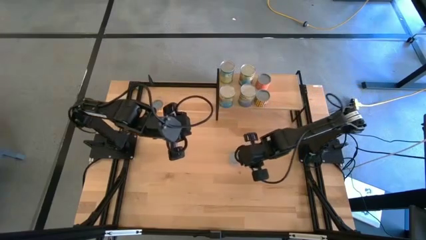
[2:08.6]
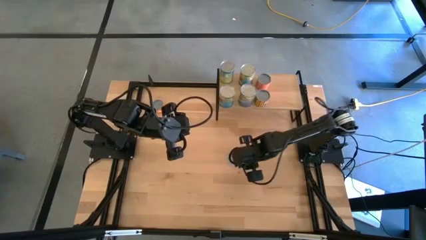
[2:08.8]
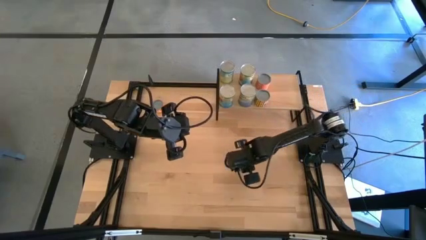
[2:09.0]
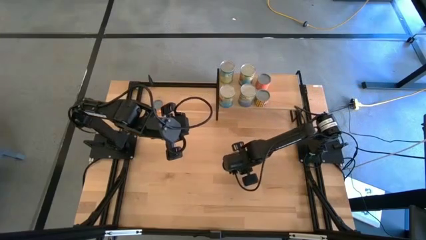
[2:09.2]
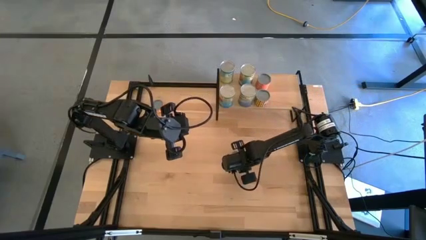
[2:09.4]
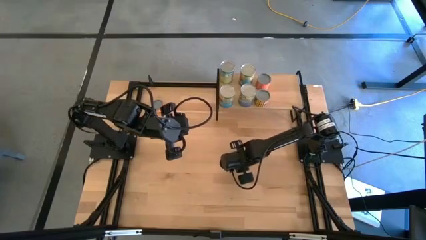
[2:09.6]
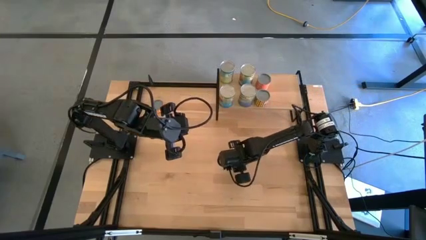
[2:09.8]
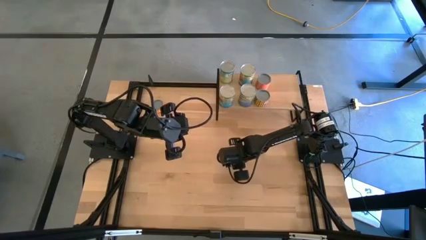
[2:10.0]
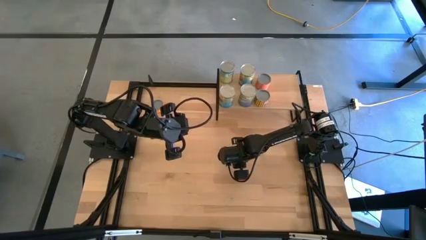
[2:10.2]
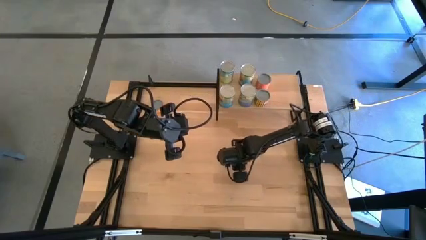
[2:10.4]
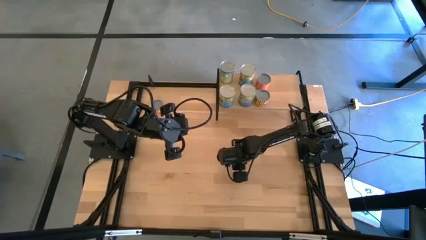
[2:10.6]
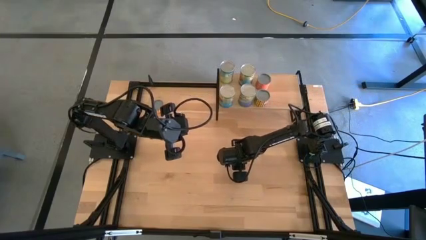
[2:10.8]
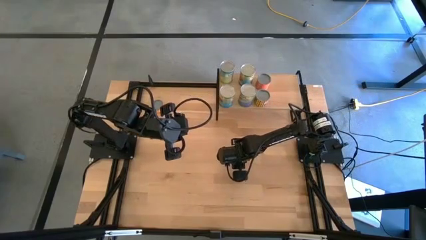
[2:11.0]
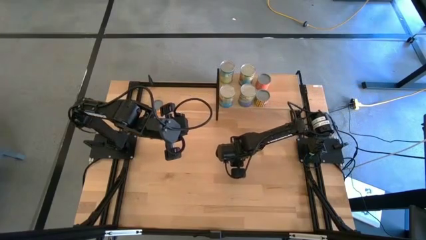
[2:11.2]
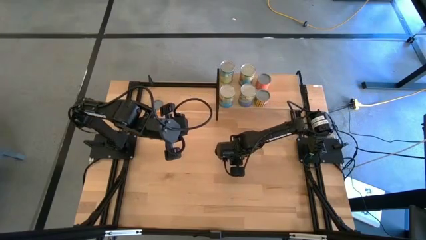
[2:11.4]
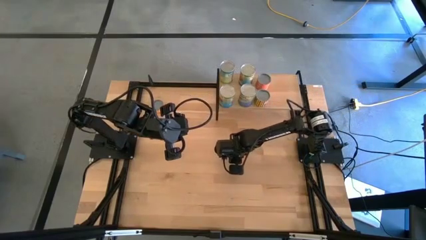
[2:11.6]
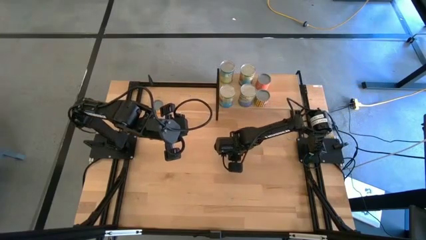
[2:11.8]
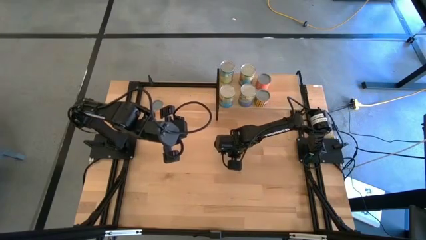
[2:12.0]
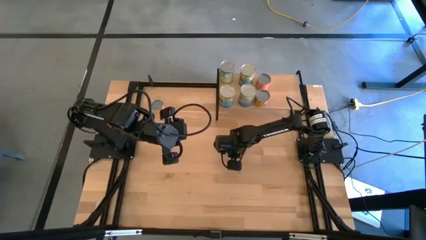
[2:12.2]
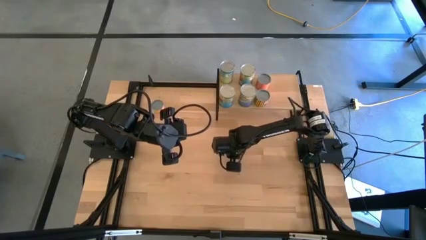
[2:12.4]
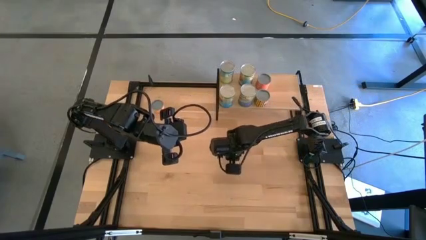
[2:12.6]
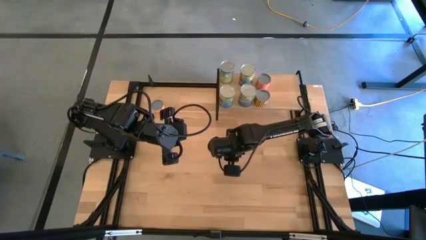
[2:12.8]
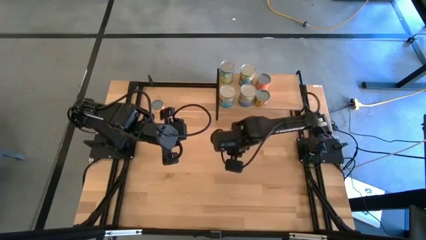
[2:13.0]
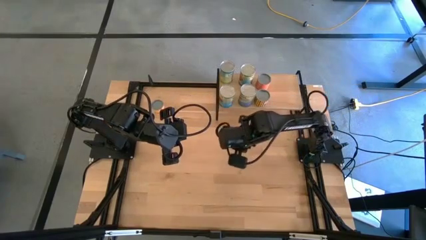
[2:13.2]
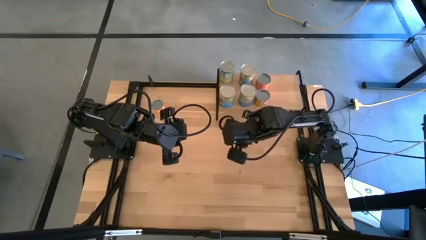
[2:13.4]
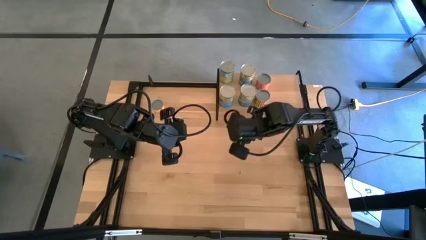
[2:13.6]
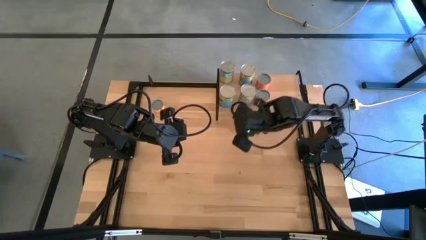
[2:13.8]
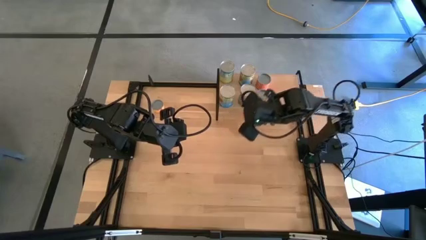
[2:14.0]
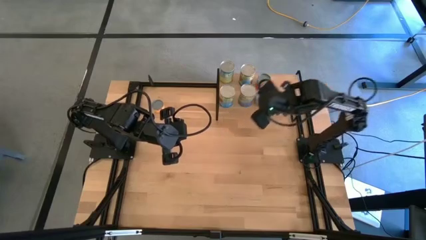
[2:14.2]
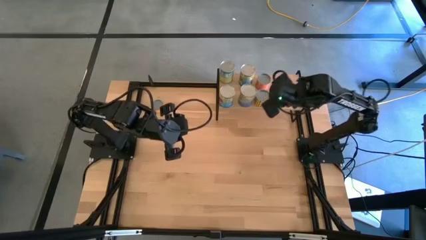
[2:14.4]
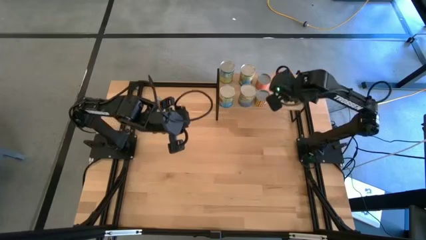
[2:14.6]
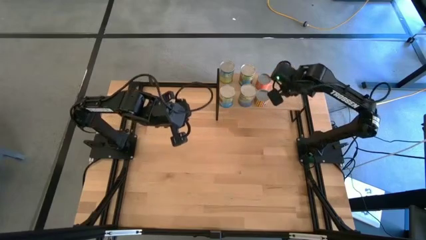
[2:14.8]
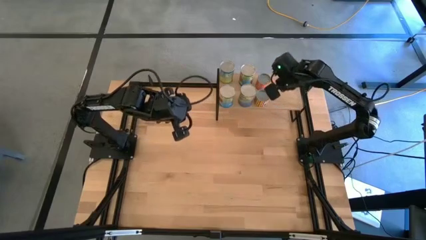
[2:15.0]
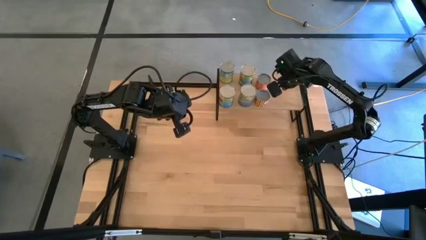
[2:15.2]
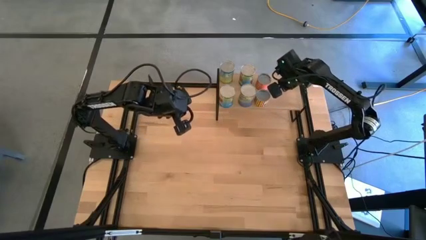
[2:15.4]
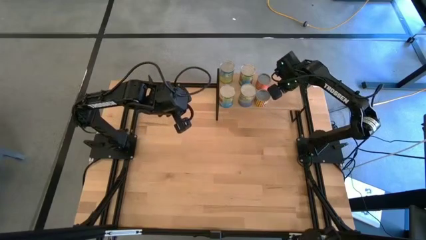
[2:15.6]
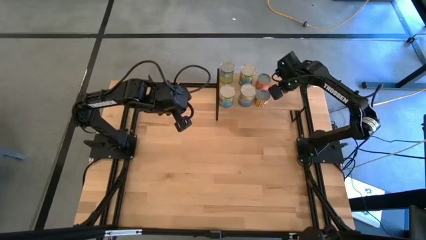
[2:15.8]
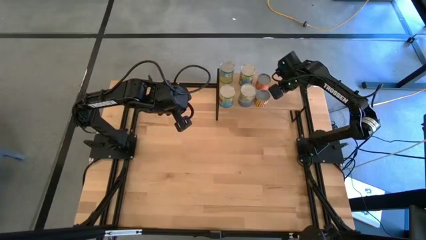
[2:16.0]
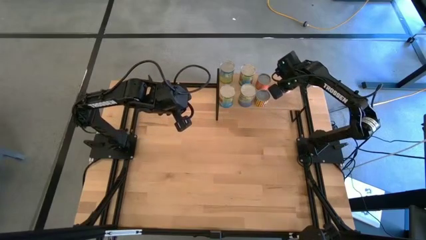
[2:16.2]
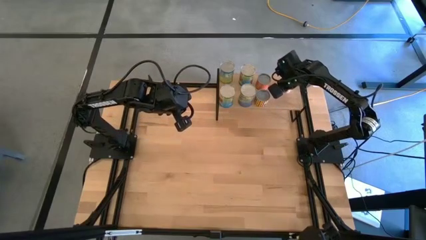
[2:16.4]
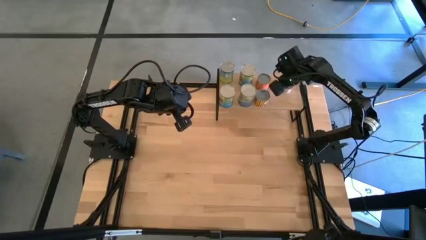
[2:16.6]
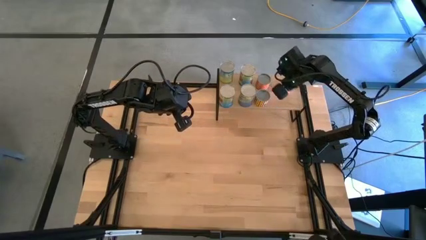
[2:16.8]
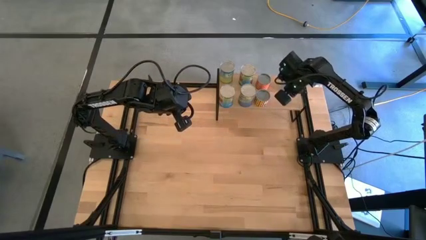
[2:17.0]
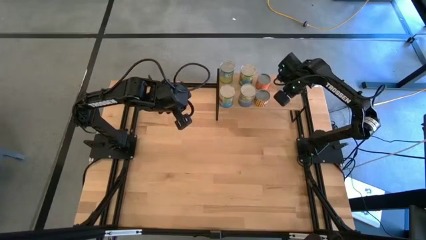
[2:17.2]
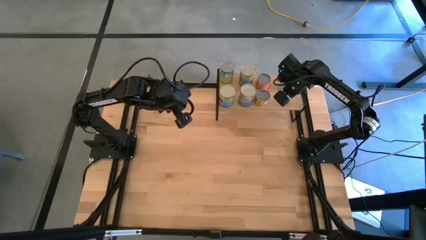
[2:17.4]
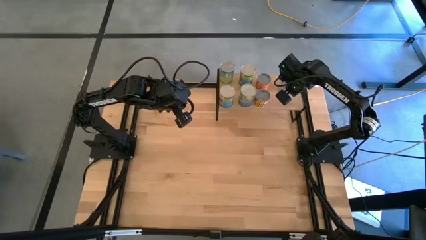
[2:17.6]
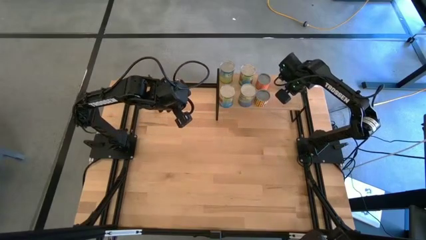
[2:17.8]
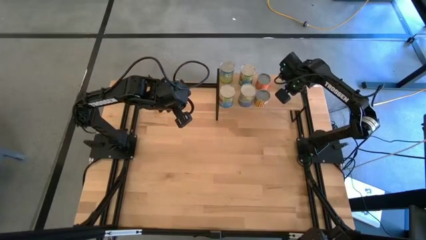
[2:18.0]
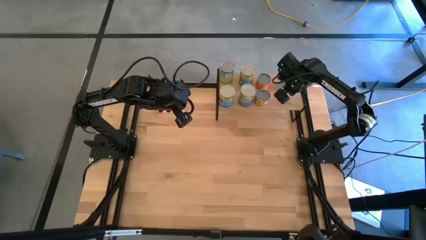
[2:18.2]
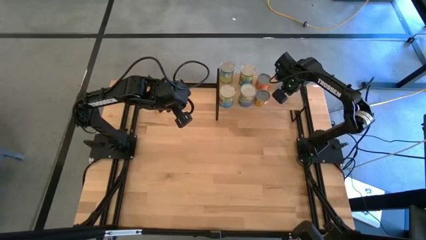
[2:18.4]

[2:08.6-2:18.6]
Task: Pick and place cans onto a shelf
Put the canned tuna on the shelf
